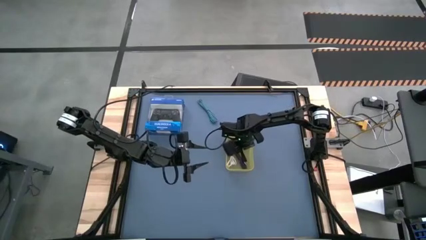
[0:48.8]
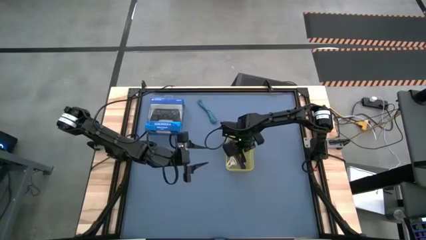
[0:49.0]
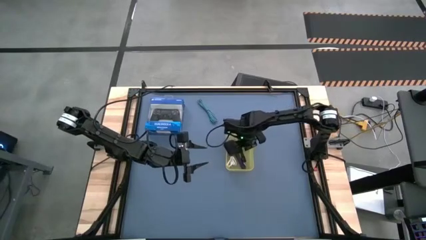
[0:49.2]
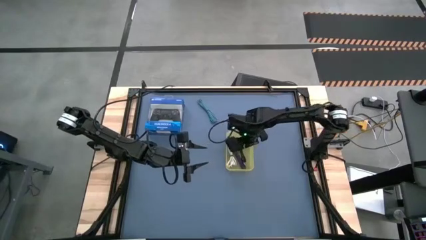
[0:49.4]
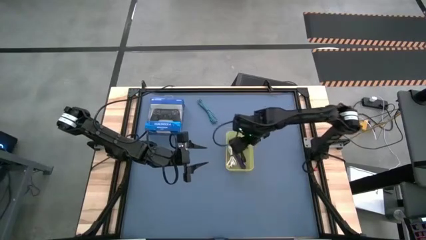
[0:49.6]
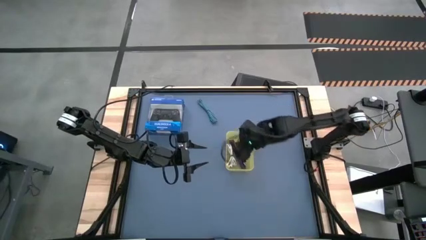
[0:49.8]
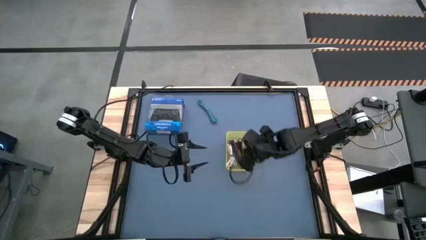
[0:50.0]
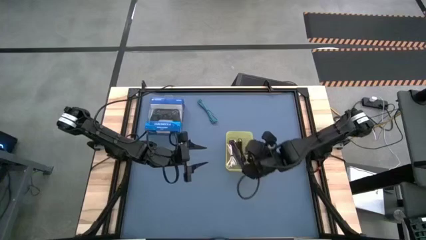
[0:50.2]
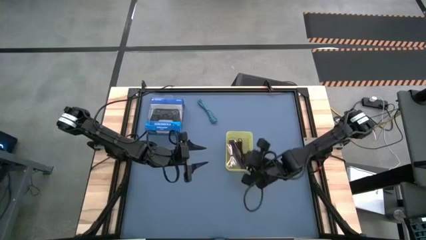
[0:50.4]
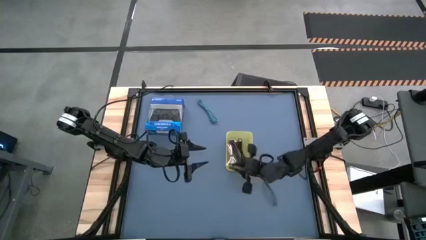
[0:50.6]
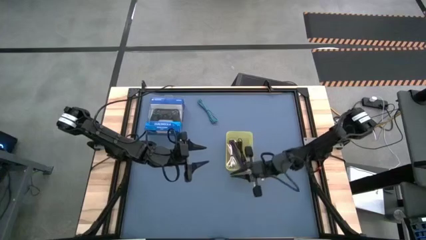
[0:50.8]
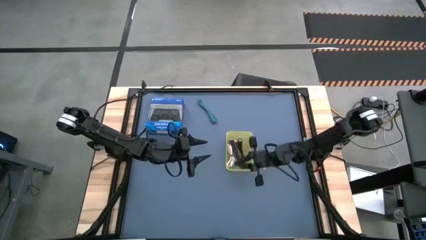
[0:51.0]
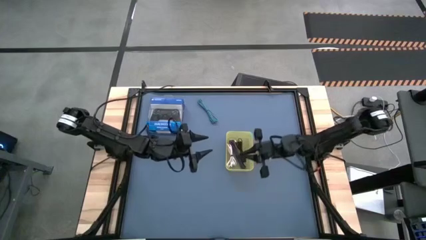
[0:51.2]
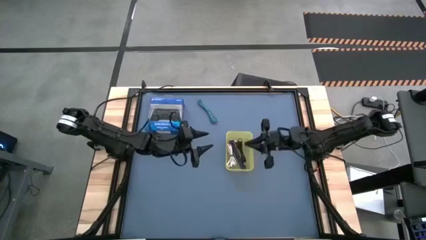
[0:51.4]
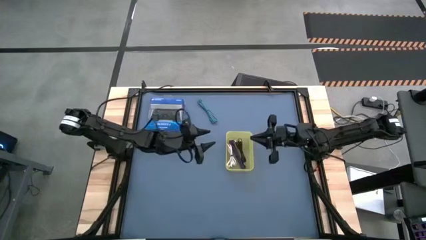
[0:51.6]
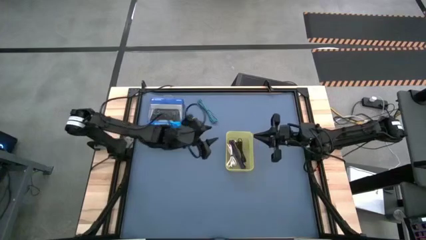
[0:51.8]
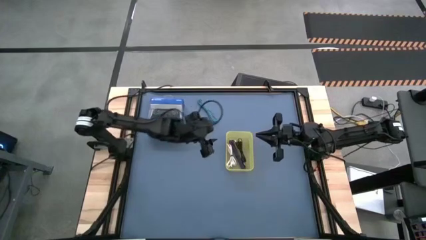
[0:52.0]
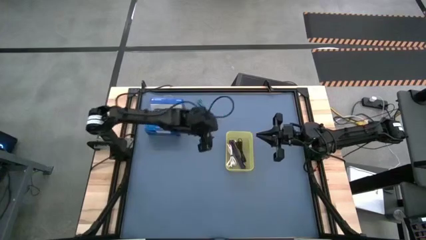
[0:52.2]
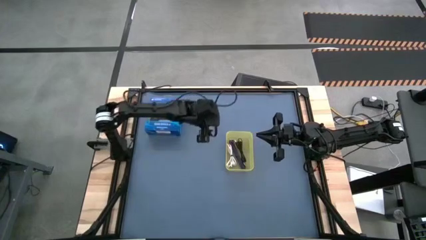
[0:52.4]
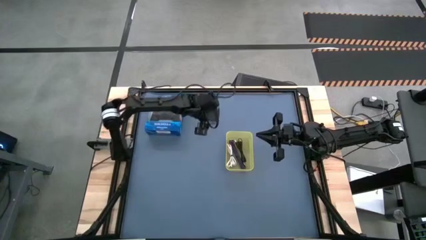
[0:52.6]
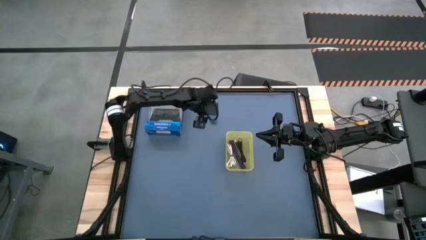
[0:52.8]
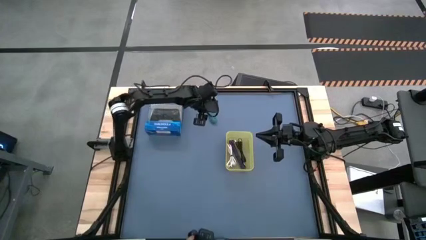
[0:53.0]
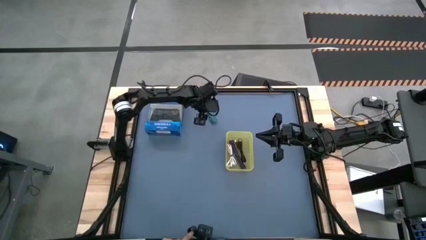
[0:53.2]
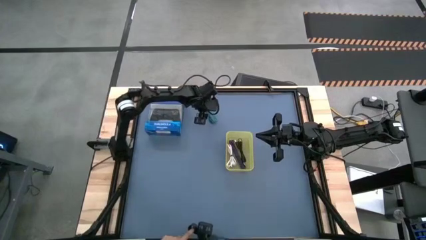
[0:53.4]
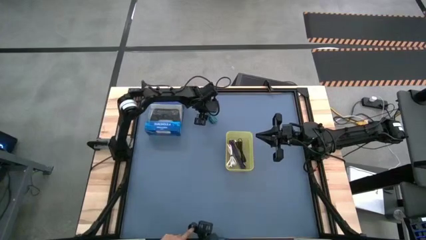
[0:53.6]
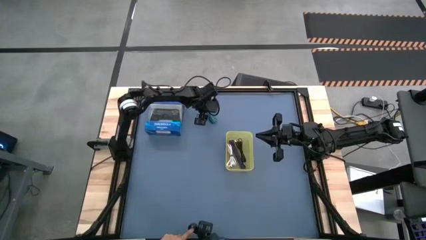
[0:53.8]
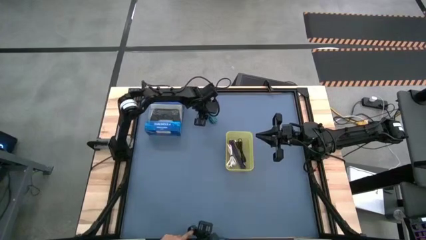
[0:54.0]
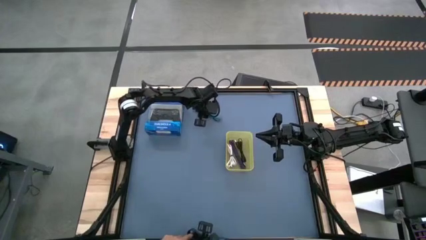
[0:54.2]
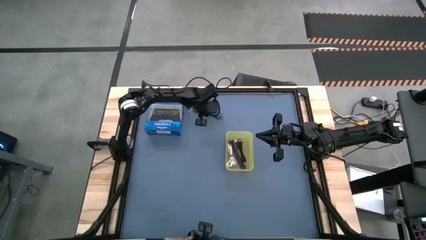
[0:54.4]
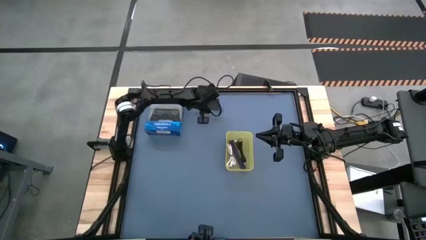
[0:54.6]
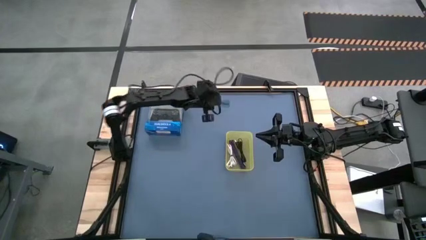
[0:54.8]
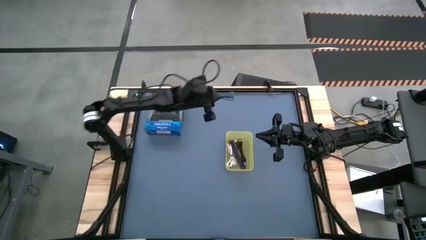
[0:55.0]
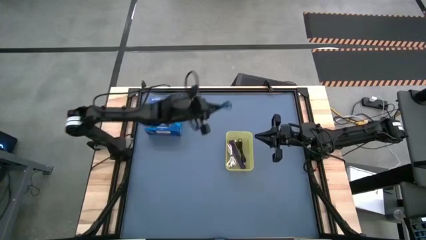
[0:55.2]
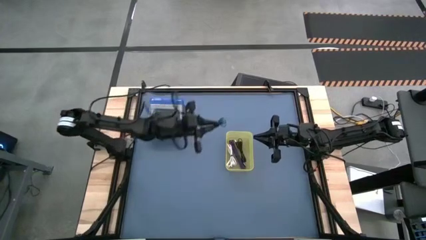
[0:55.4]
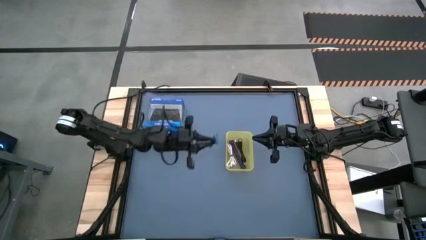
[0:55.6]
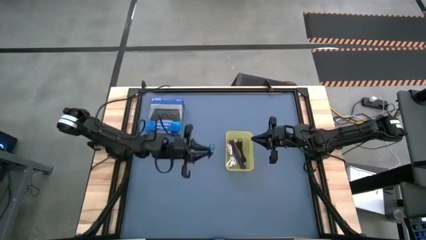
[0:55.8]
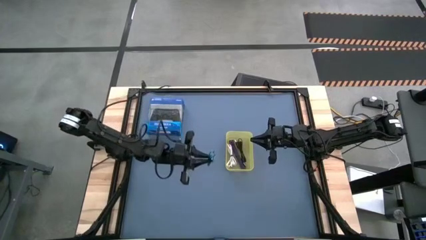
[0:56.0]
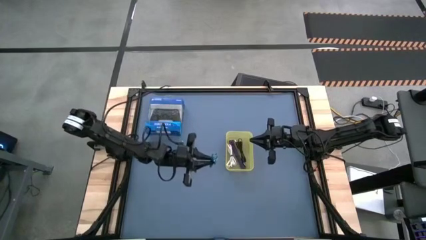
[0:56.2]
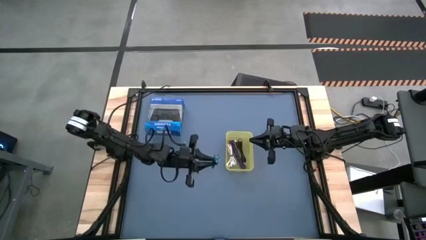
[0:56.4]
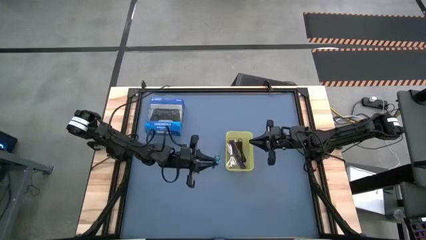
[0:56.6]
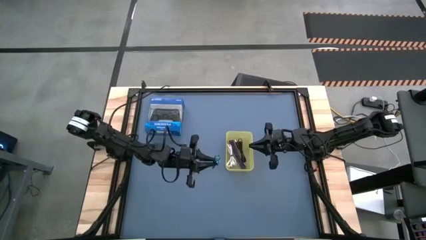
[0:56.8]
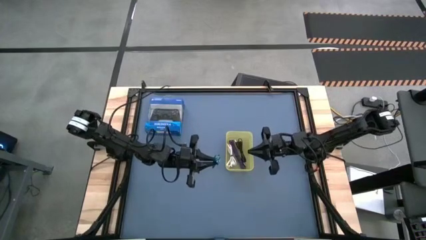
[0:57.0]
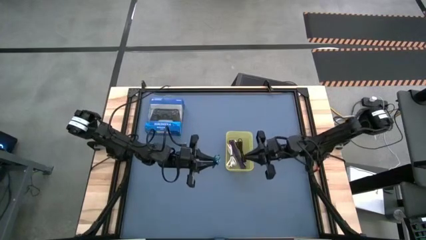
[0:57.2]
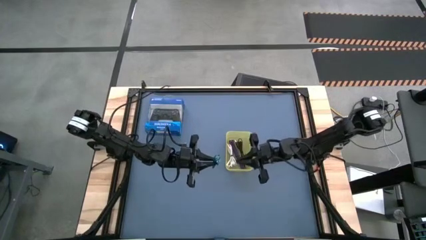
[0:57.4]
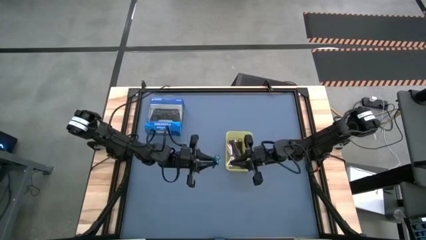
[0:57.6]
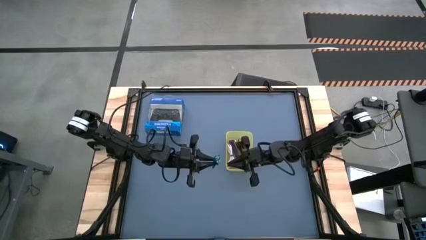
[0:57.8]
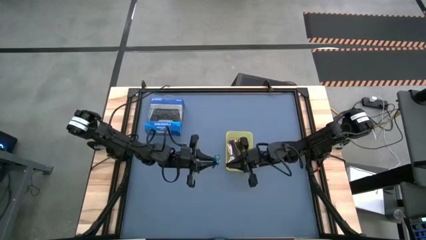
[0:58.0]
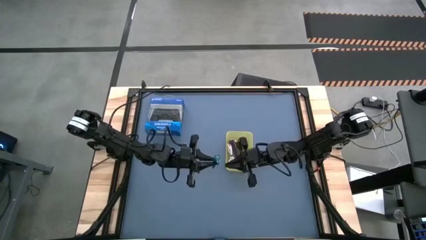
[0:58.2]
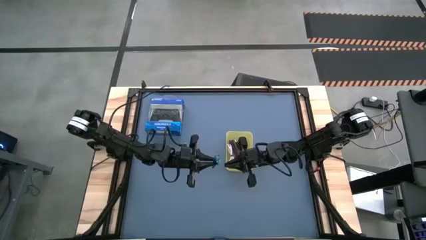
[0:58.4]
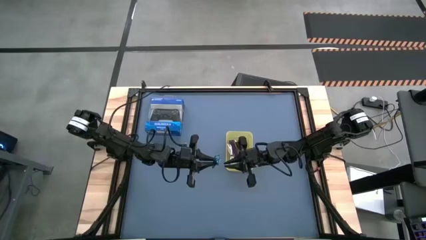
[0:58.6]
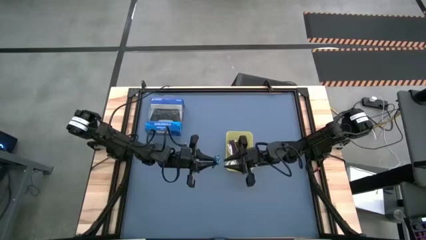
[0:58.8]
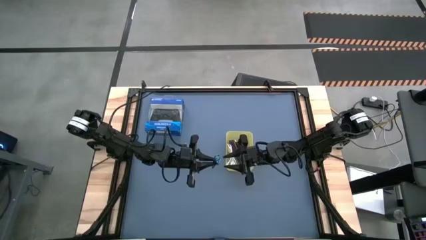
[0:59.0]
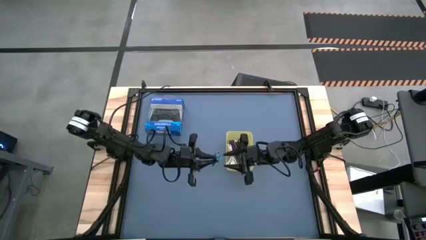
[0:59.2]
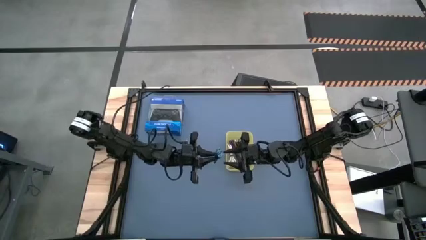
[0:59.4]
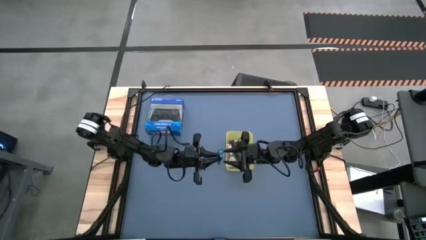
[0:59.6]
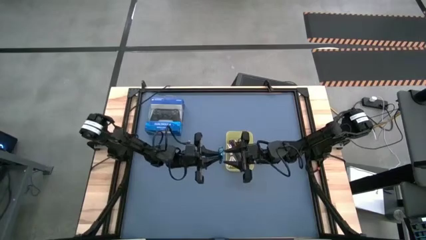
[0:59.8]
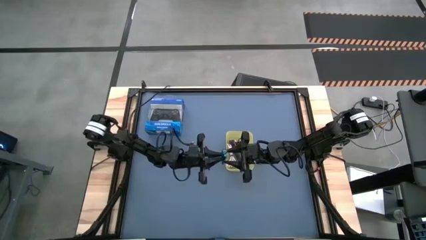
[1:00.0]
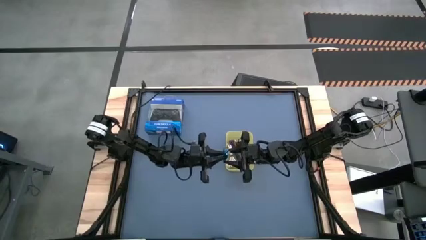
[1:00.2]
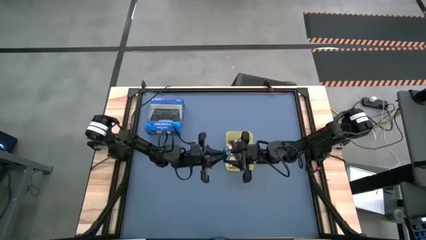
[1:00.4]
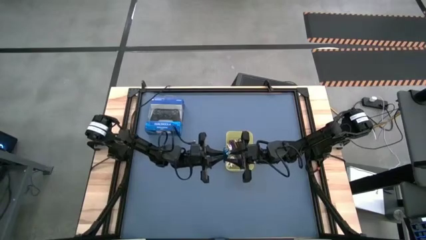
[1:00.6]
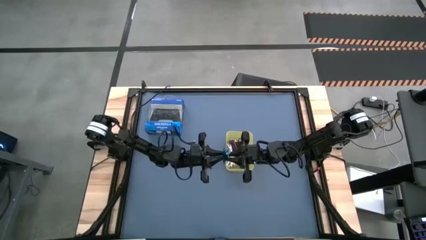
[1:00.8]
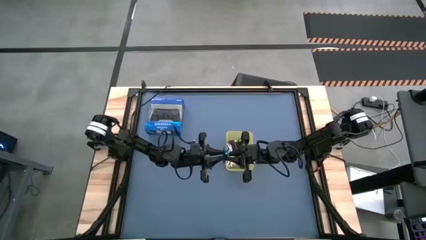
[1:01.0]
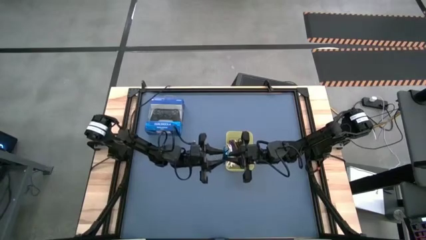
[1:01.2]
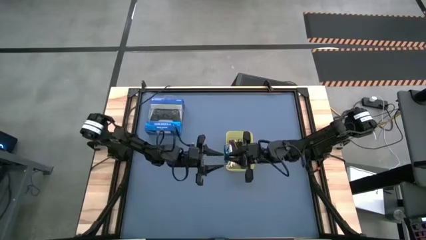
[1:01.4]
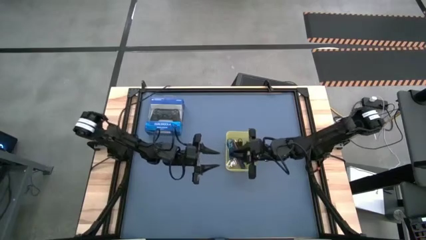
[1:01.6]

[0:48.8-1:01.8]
Task: Pick and place USB-C Cables
Put the black blue charger cable into the yellow bin

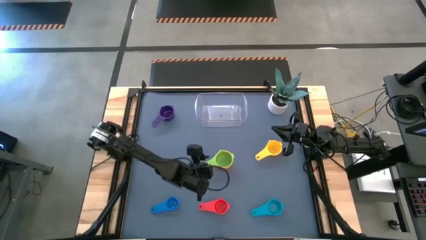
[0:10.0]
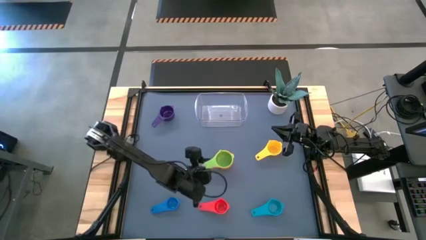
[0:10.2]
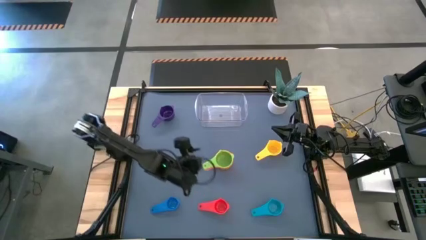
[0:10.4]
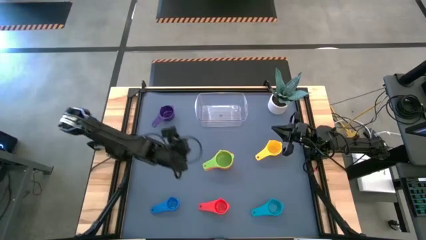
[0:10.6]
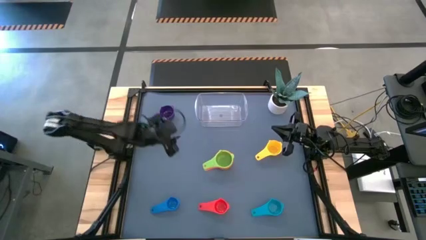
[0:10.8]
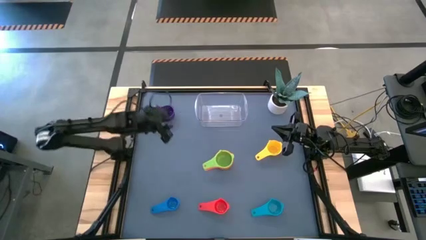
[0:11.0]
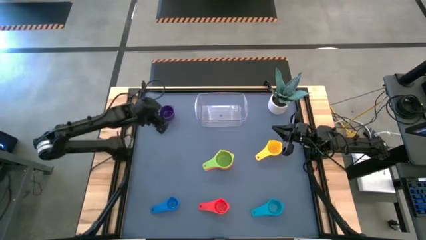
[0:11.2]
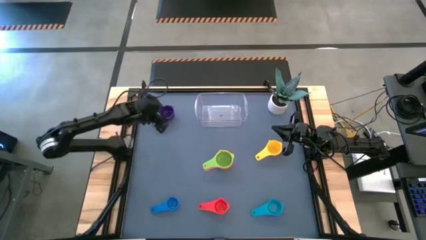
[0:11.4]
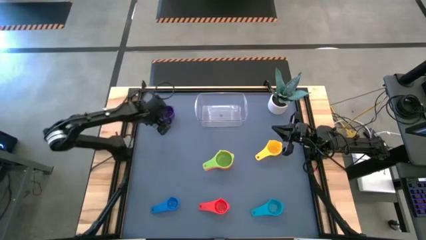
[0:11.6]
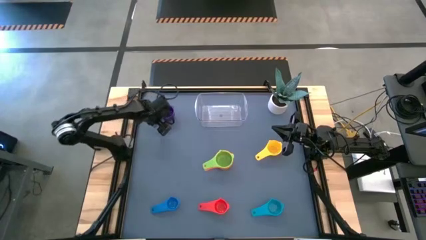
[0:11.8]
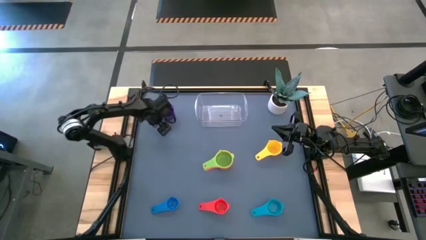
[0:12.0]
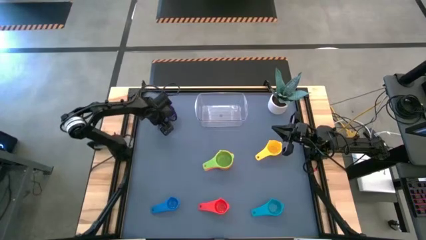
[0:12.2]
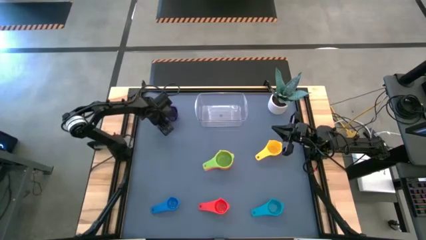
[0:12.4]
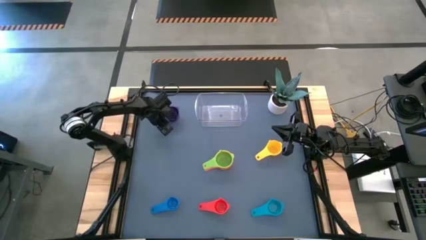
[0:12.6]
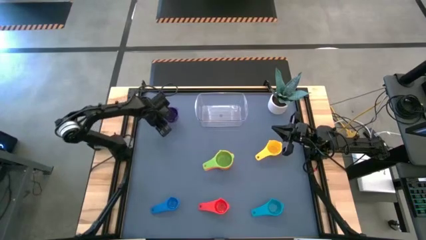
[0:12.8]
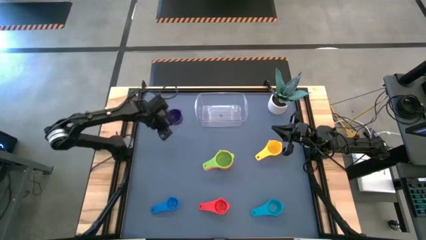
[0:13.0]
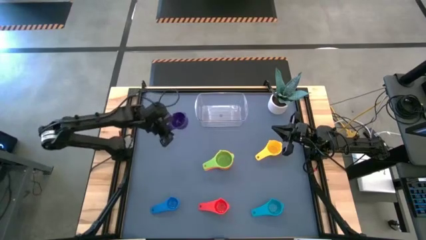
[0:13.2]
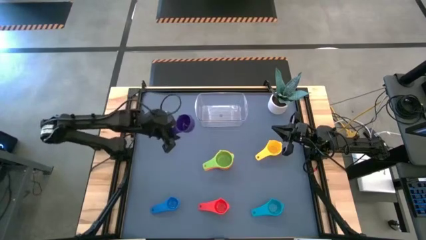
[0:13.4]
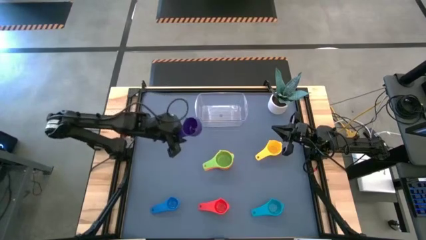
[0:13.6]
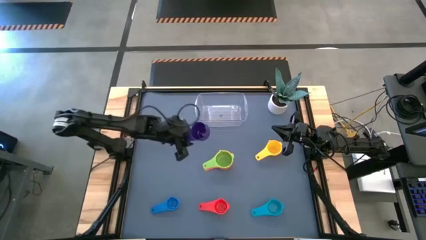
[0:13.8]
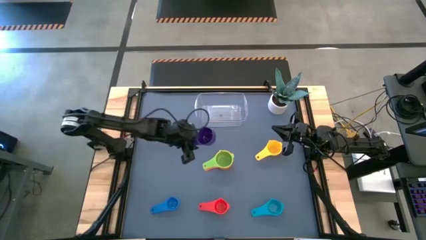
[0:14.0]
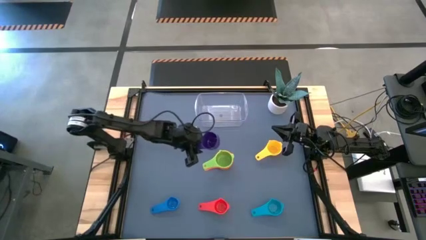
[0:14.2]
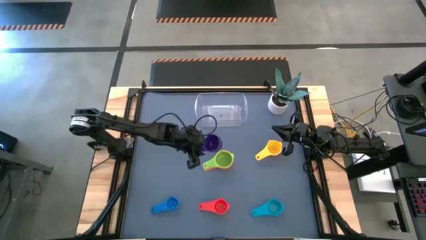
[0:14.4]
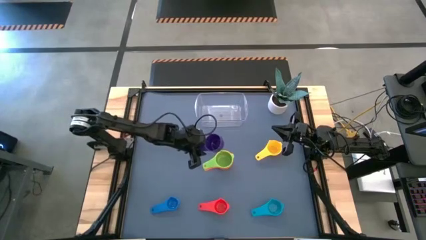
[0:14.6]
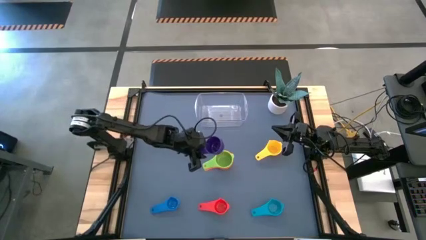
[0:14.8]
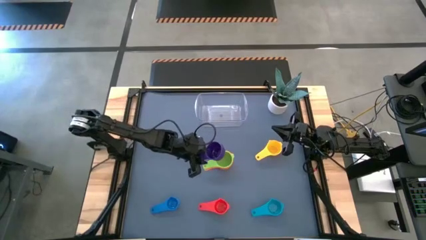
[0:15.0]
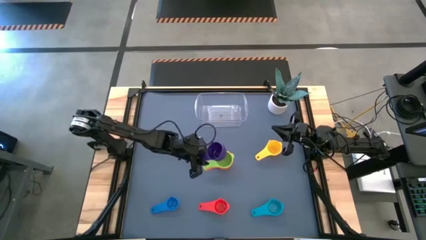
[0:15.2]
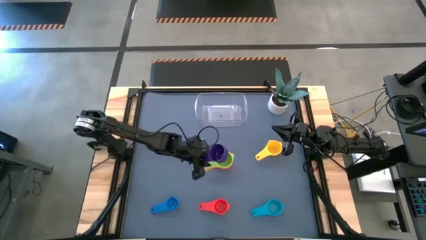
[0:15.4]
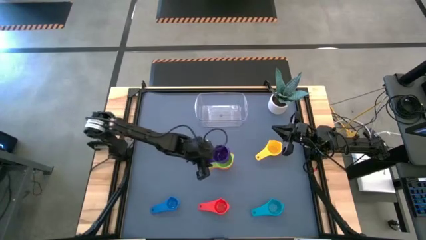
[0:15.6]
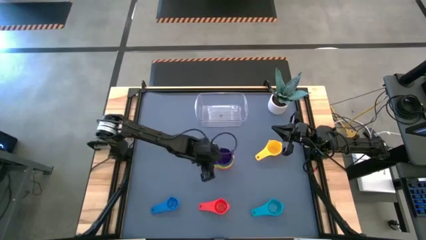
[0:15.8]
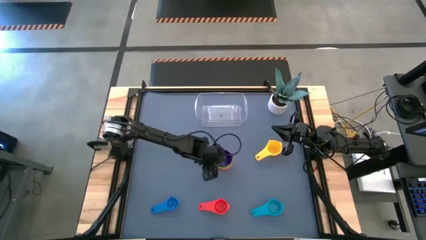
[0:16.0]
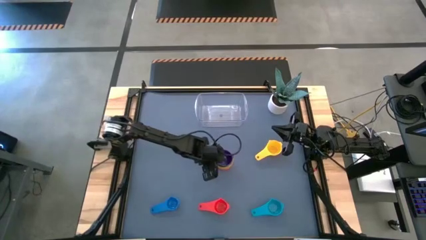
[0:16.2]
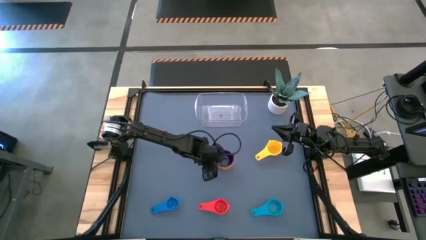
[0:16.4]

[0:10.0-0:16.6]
Task: Nest measuring cups in basket
Stack the violet measuring cup on top of the green measuring cup
